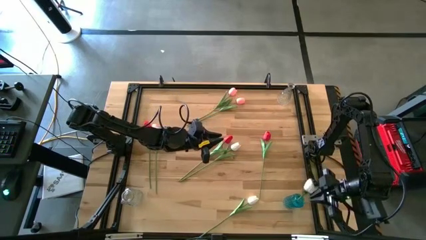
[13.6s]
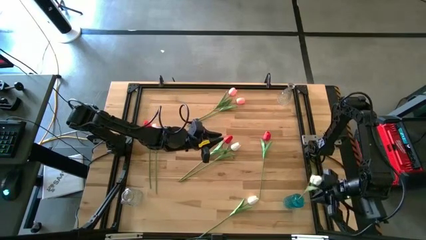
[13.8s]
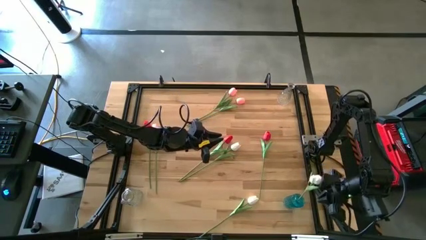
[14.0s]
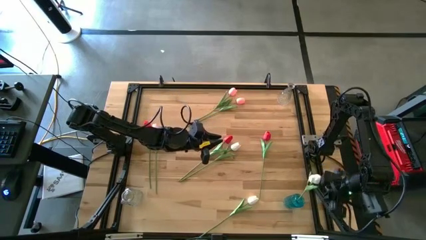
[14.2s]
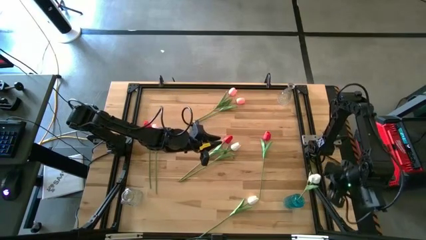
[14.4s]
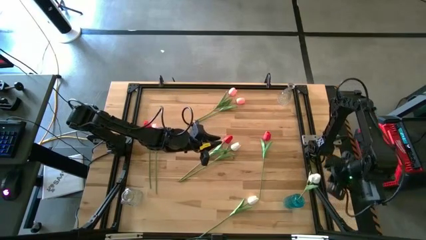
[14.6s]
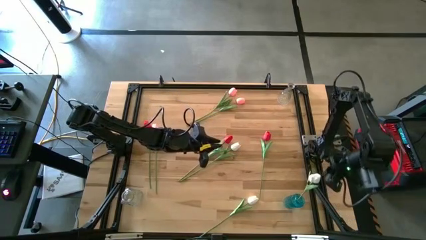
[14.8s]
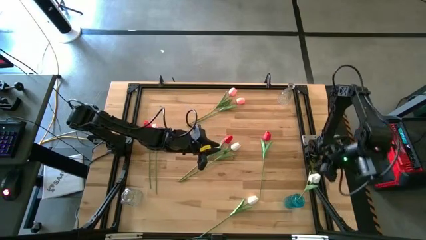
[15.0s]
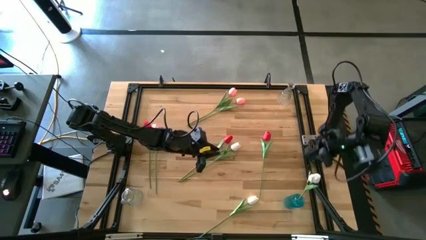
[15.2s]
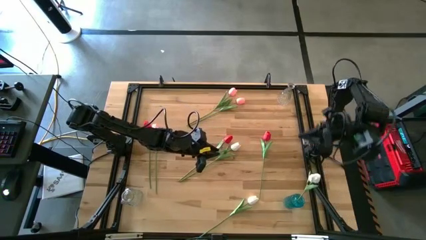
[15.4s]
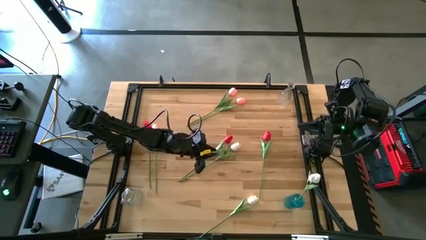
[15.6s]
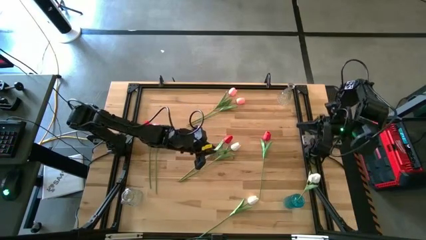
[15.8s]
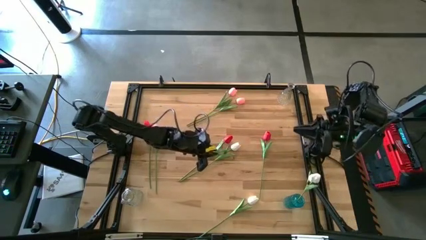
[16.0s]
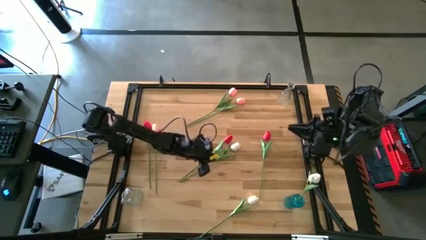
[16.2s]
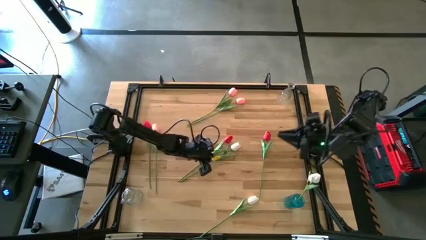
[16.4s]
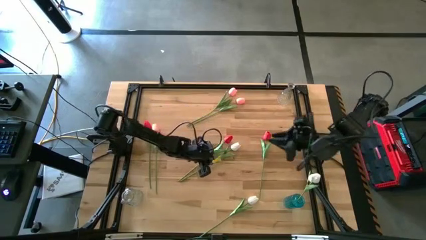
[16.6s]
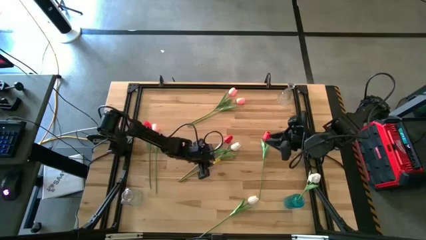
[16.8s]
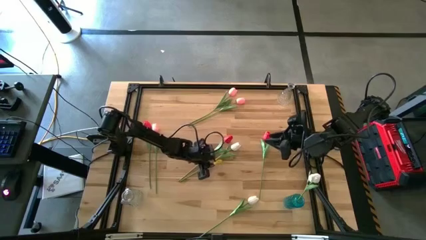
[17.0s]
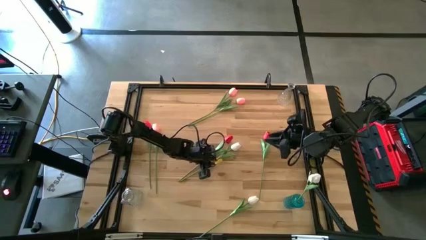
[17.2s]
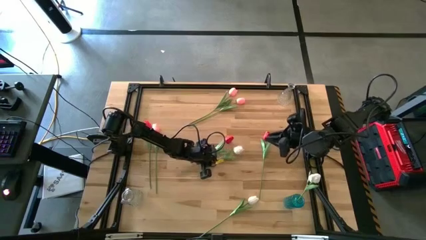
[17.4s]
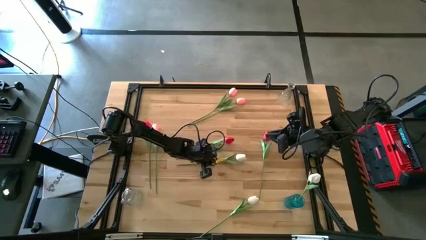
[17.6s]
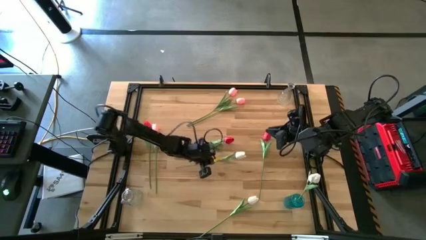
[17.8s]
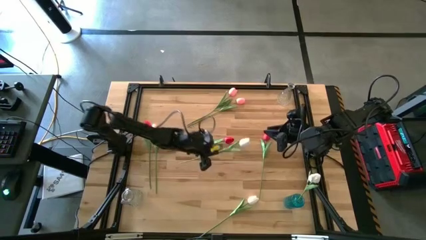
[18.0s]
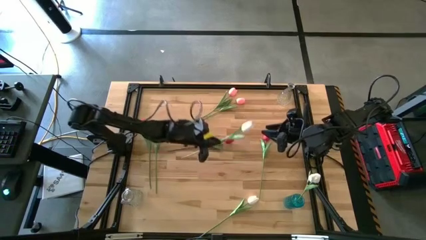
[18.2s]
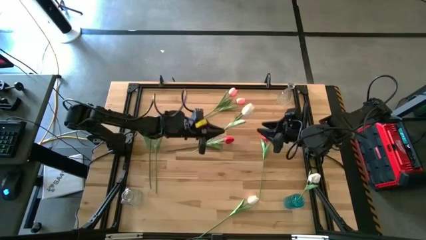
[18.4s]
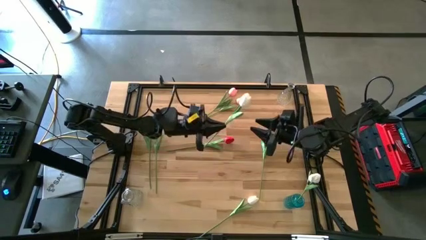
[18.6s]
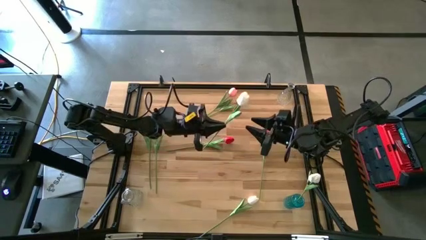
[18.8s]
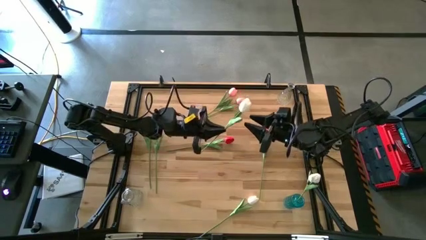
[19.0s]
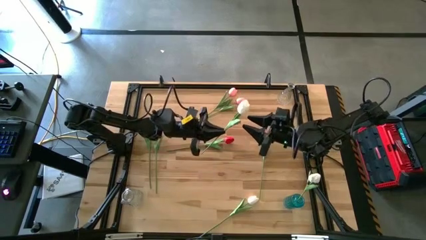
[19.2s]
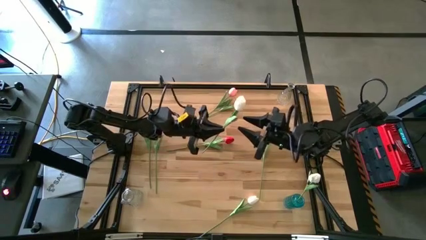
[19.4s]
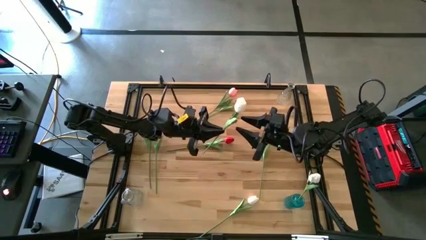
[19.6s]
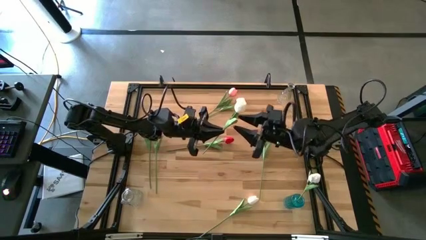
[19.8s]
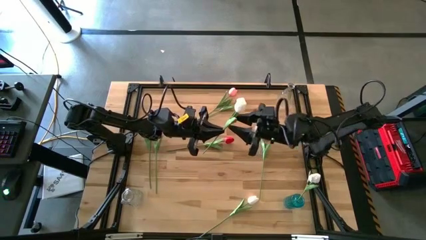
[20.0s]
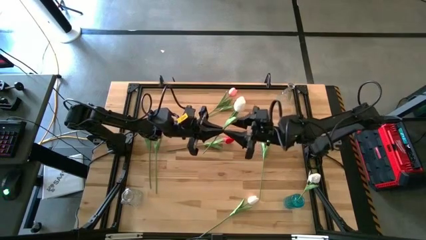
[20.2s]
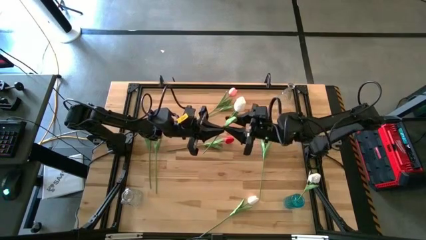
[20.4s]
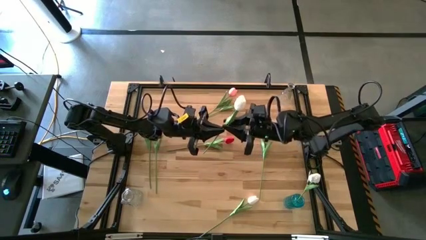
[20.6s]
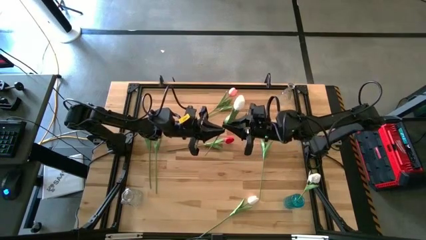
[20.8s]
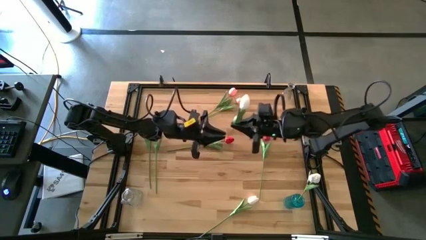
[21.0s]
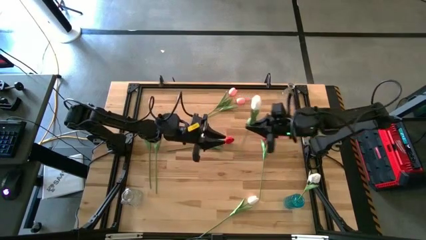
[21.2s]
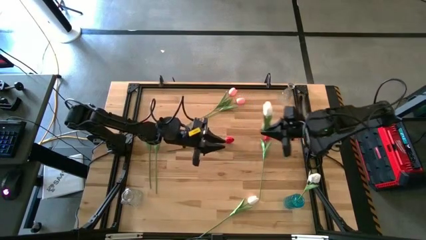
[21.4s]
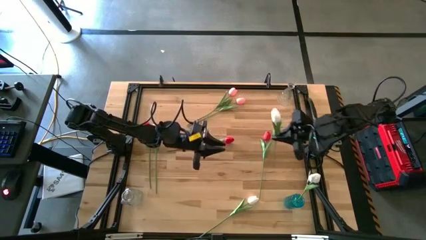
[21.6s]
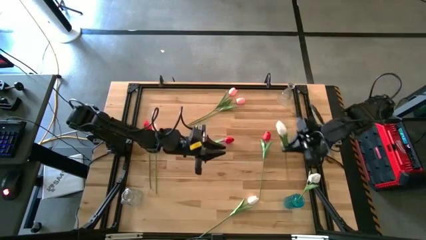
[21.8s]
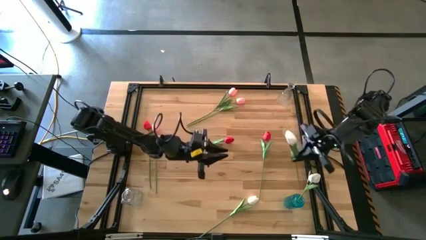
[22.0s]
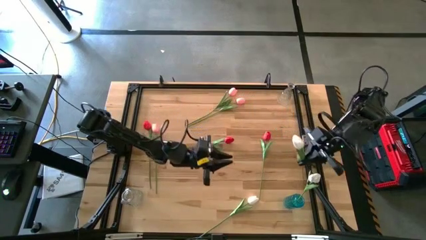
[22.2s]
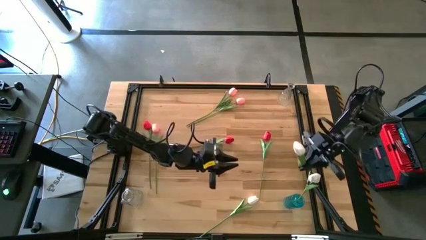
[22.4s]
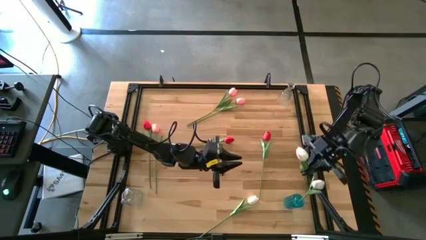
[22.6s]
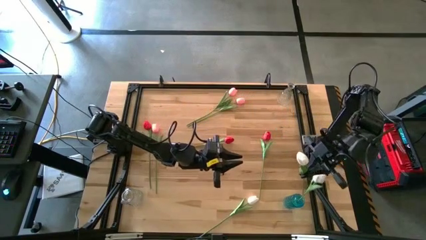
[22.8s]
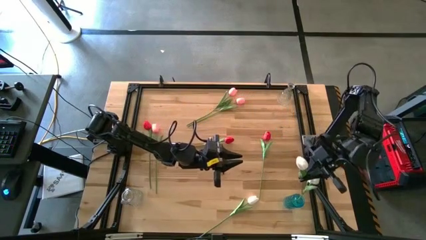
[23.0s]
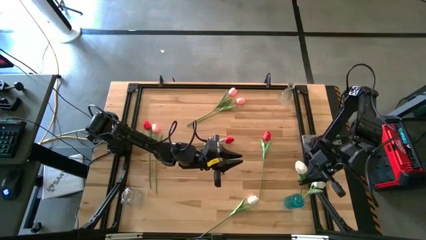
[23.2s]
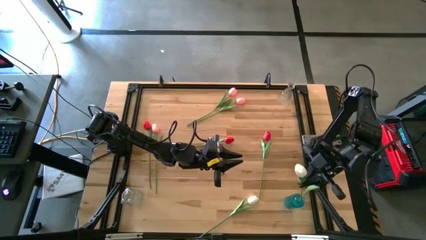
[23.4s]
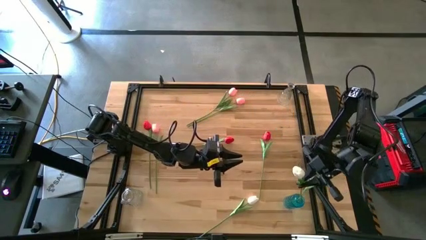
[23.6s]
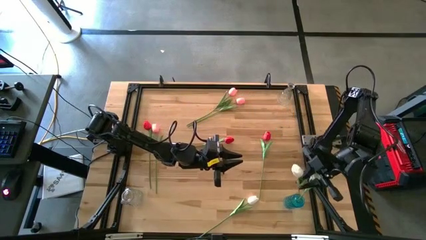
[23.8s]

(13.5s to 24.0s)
Task: Sort flowers into vase by color
Put the top white flower into the blue vase

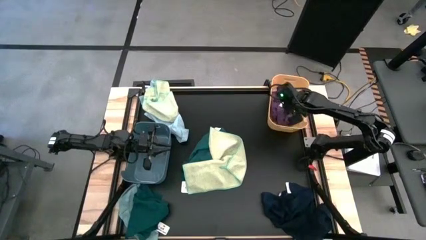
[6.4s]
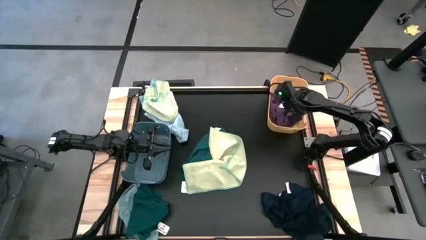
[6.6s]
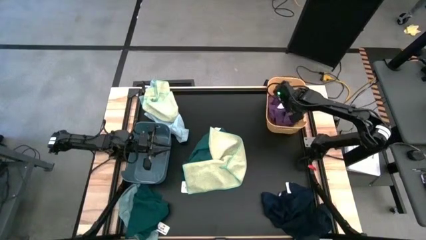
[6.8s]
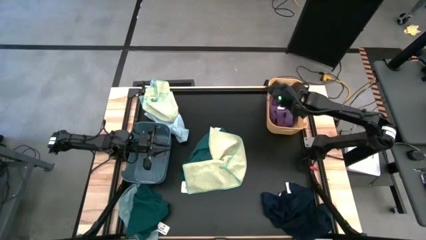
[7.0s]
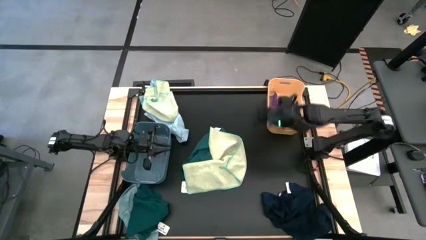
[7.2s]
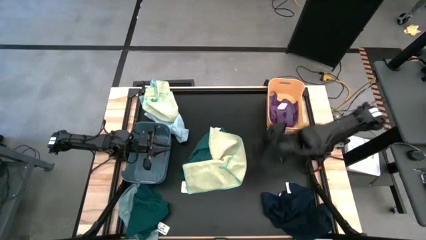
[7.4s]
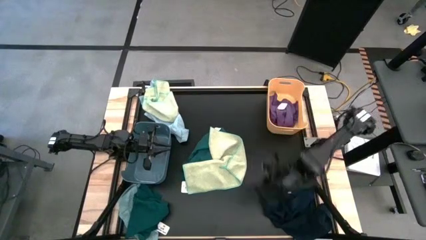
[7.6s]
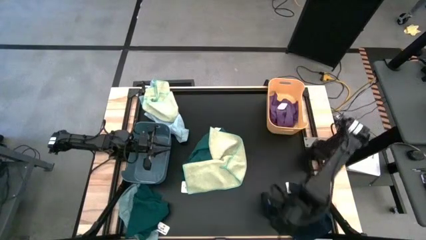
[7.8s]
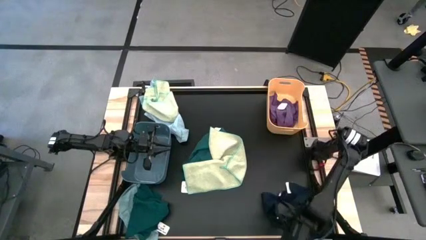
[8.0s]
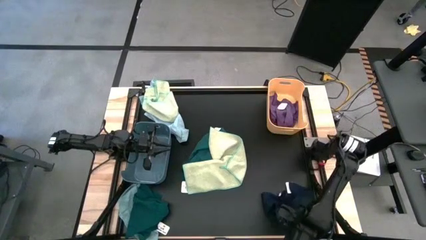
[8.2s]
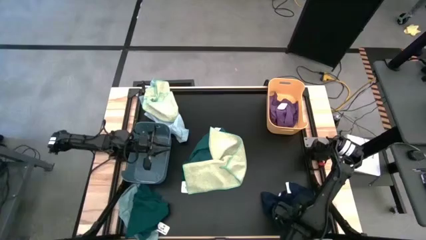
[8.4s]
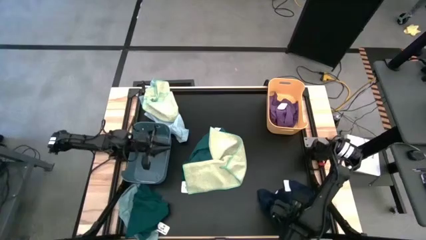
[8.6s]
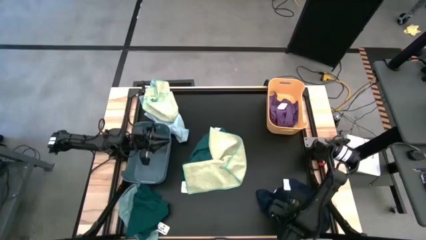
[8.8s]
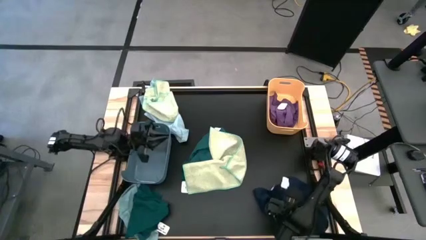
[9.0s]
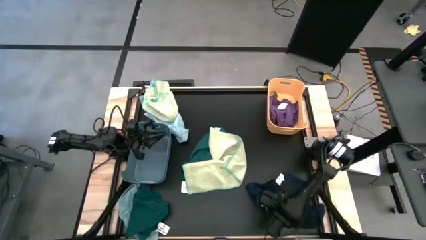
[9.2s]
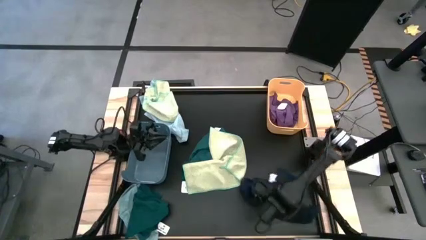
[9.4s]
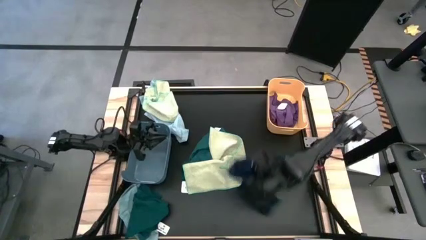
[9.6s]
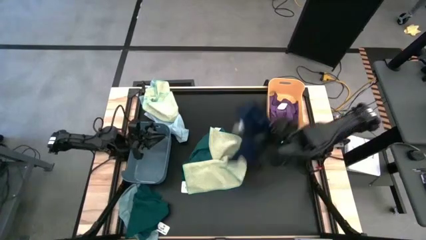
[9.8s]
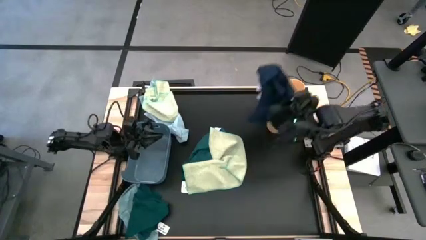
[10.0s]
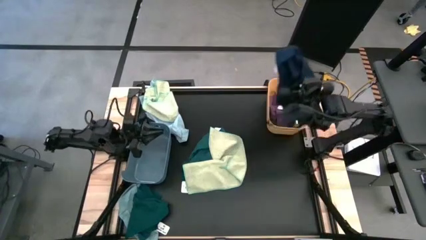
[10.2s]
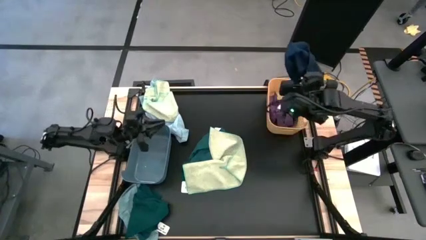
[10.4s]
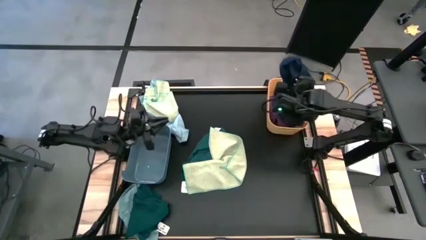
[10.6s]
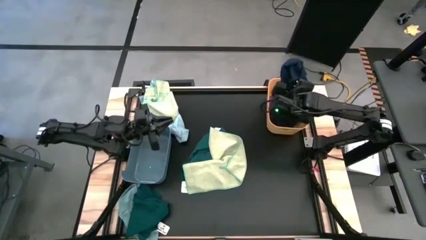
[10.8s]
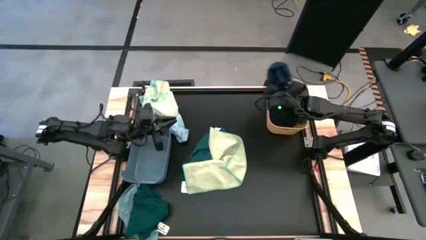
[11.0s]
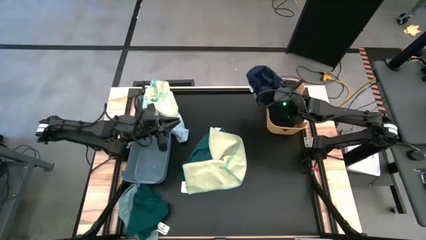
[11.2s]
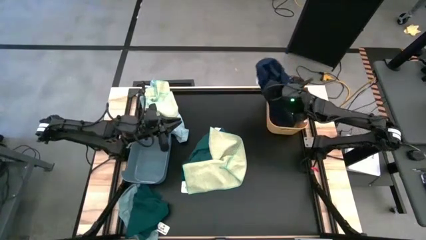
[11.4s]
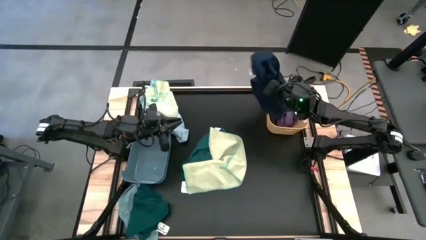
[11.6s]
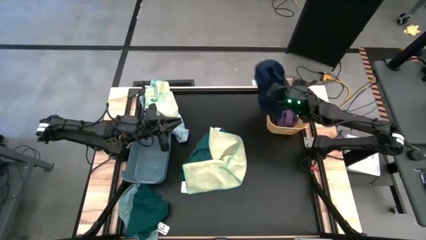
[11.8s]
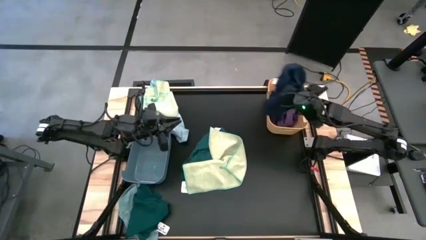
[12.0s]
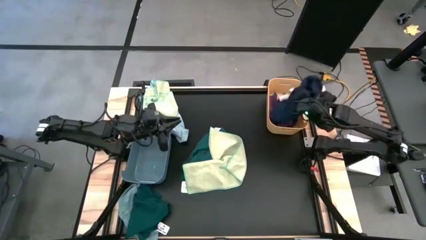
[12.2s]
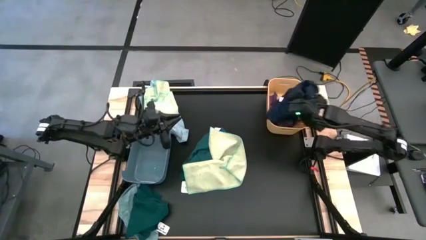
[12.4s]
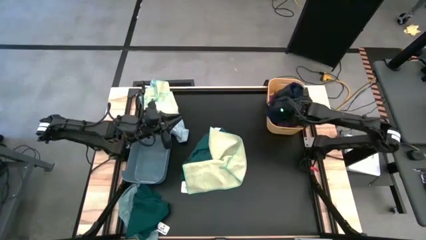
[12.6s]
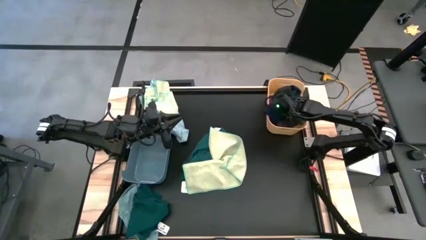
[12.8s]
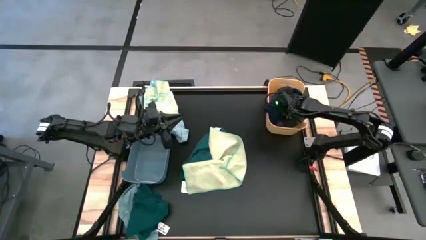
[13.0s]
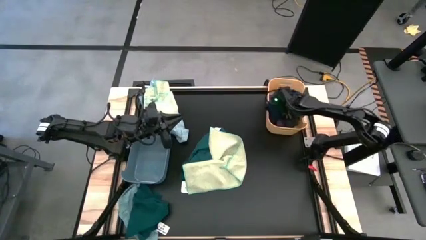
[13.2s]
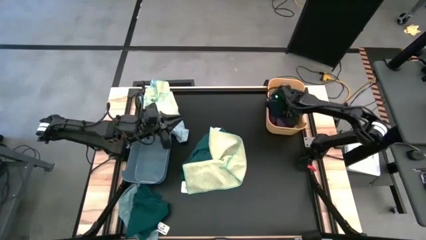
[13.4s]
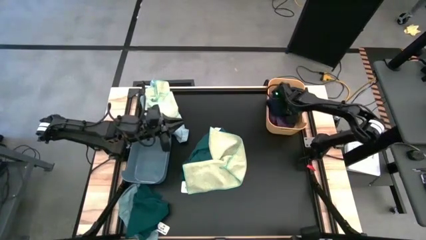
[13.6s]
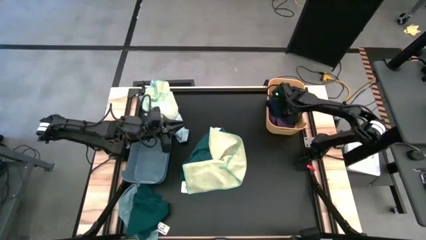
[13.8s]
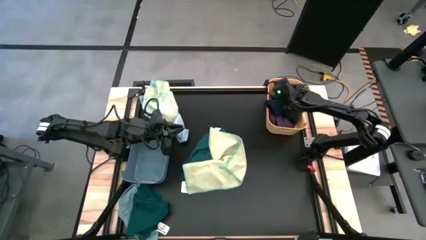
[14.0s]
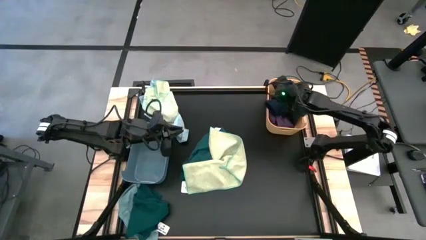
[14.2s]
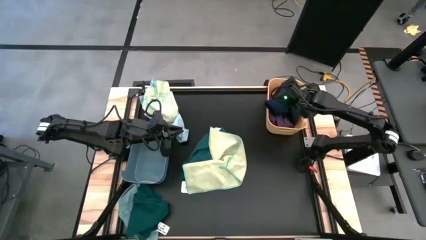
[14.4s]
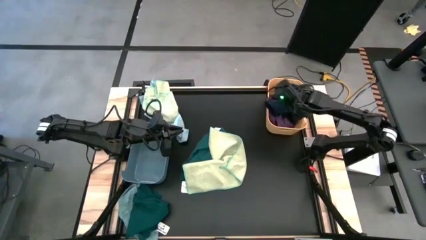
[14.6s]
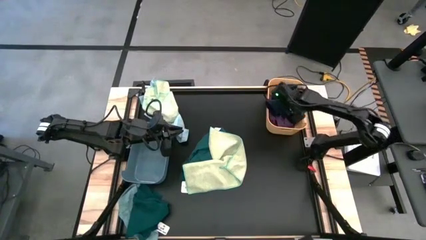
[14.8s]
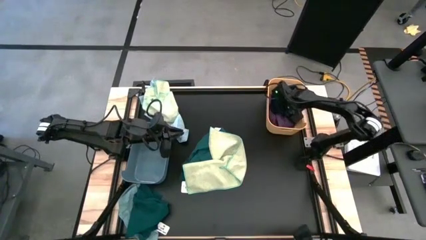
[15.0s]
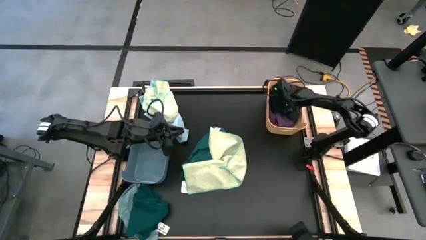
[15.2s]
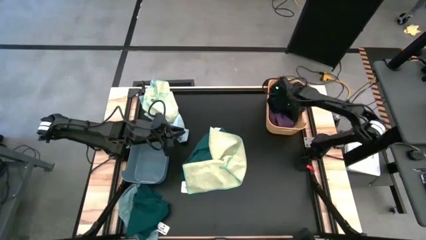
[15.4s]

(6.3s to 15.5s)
Task: Sort towels by color in basket
Put the dark blue towel into the orange bin
